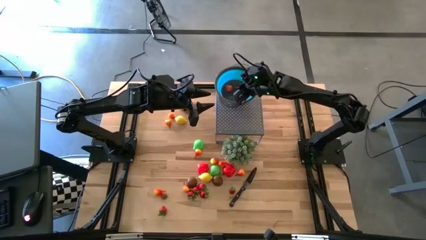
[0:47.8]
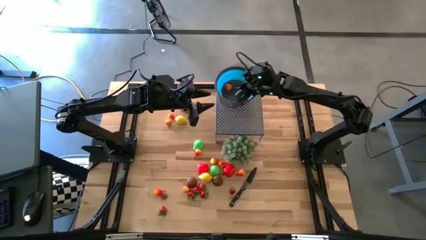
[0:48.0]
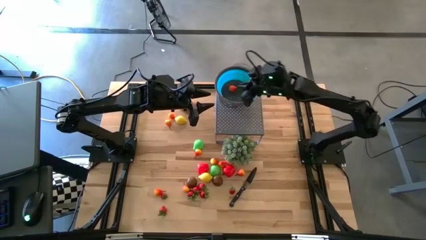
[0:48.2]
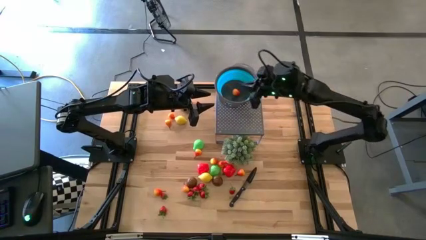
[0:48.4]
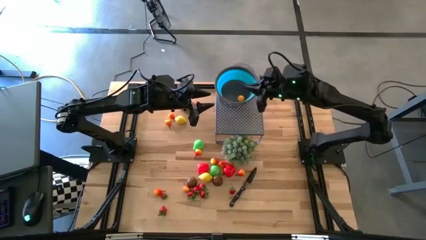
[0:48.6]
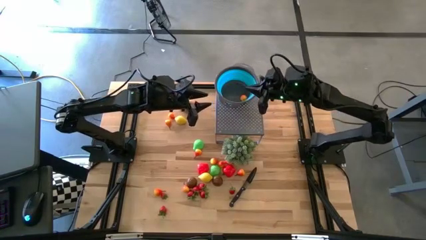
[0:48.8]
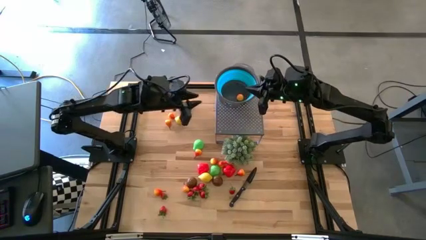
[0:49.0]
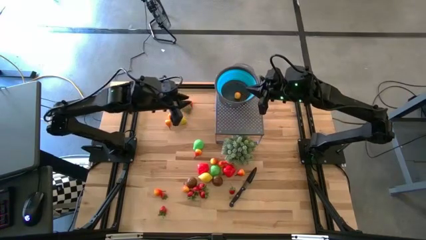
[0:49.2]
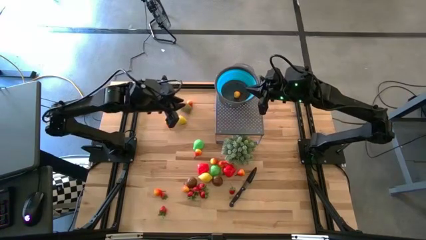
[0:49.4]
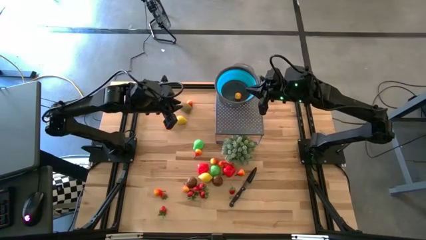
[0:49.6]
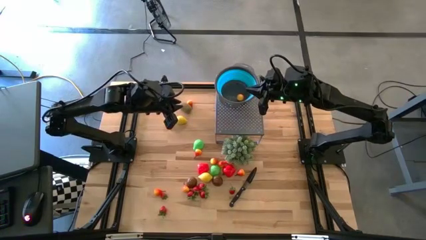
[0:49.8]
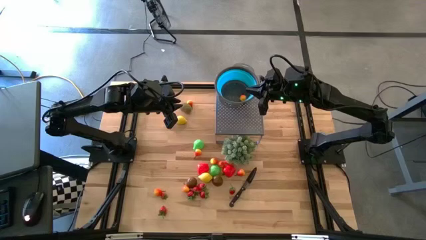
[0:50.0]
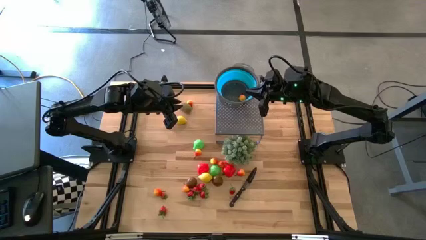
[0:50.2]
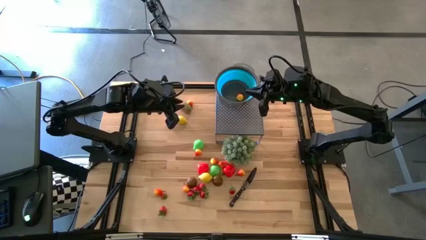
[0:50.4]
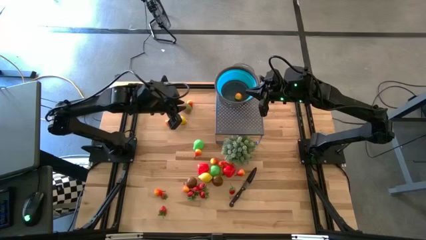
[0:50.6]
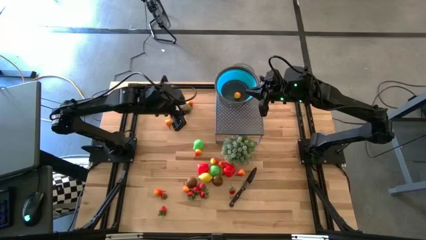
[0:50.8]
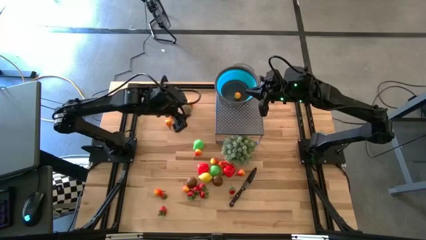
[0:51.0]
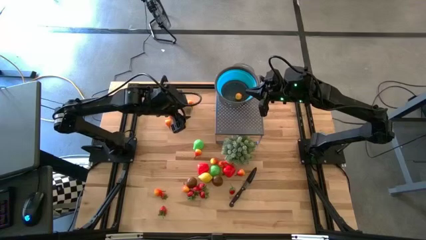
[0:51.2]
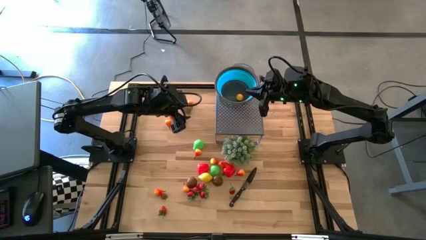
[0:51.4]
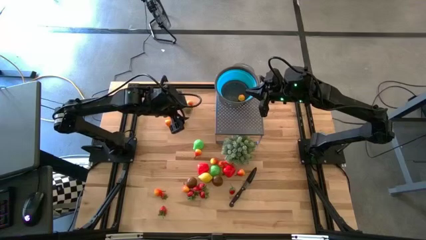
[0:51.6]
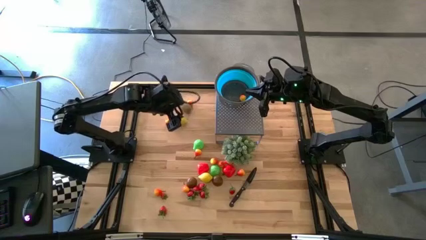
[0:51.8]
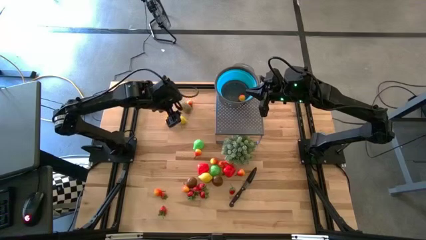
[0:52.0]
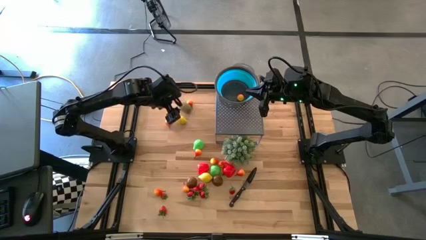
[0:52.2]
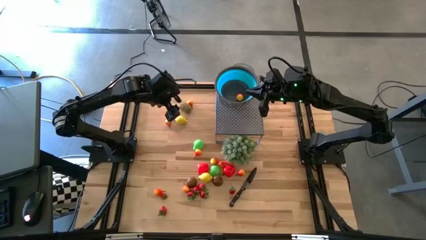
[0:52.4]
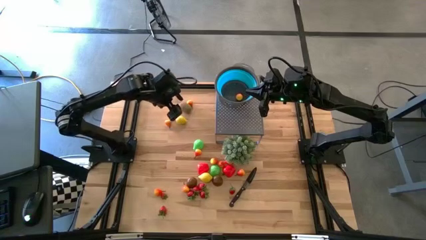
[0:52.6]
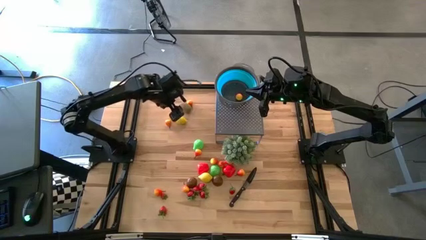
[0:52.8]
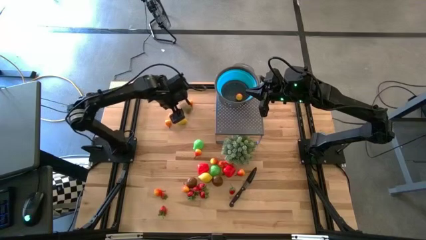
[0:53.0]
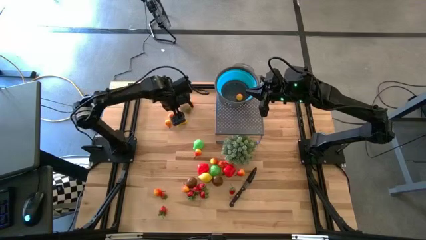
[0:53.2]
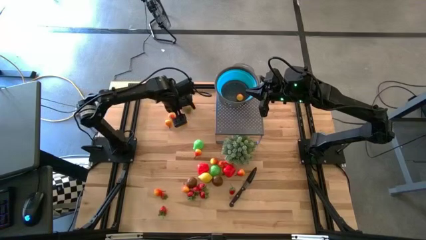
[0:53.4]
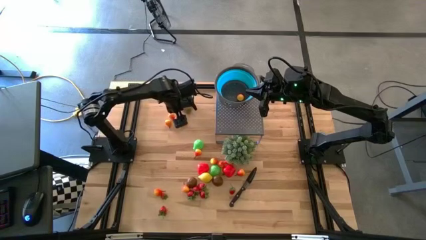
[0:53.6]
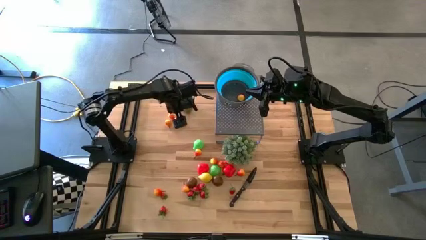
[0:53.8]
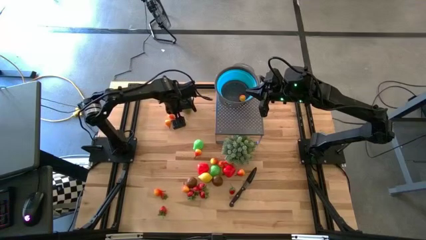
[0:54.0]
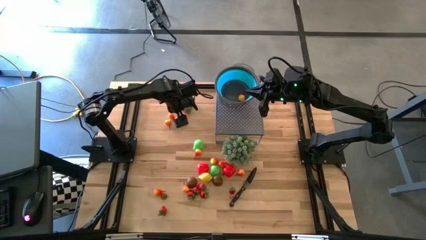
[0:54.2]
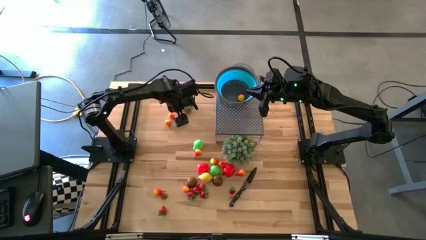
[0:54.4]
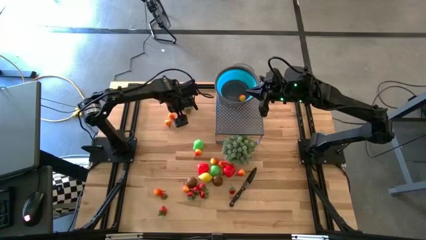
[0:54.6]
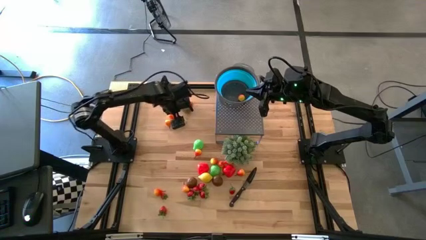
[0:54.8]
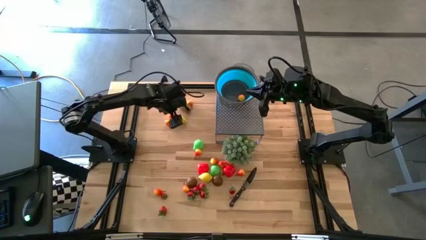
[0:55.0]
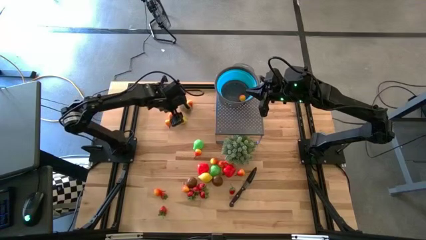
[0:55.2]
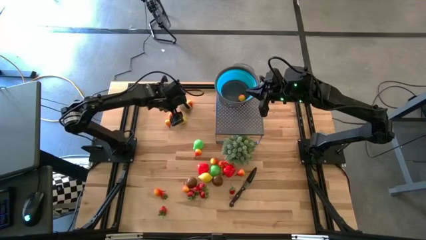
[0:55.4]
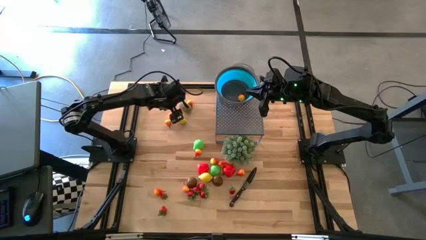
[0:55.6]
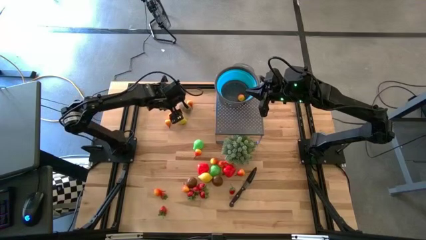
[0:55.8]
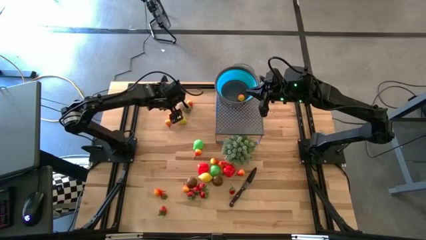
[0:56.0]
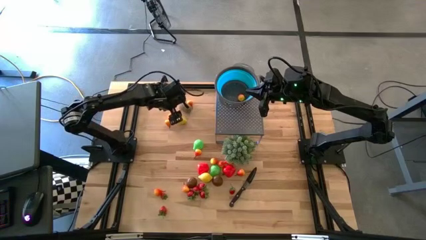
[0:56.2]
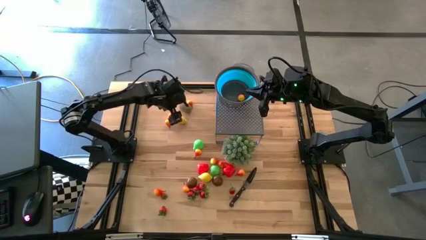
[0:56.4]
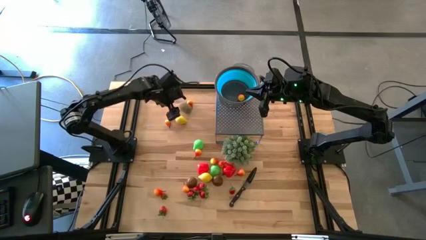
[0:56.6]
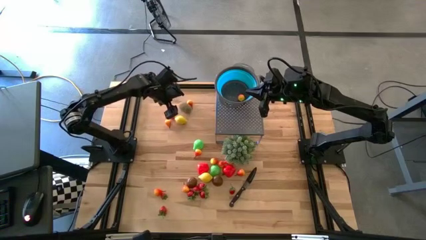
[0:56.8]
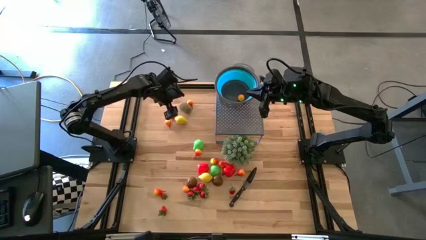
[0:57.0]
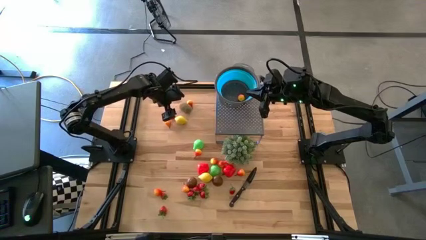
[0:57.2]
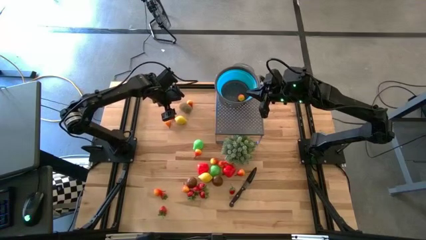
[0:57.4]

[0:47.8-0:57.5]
Task: Pick & Place Fruit
Put the yellow lemon into the blue strainer bowl

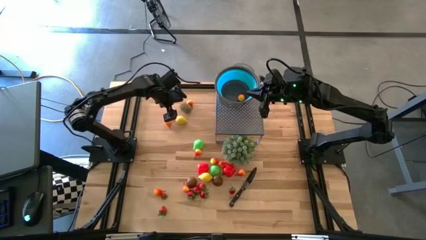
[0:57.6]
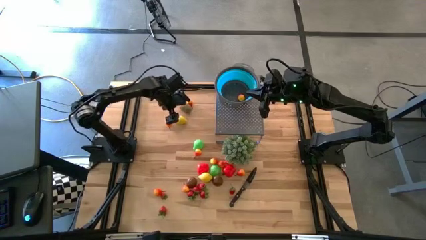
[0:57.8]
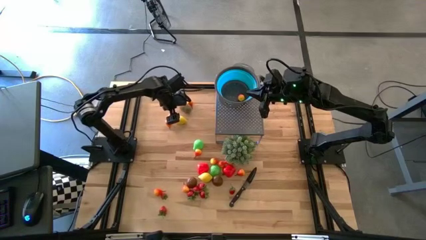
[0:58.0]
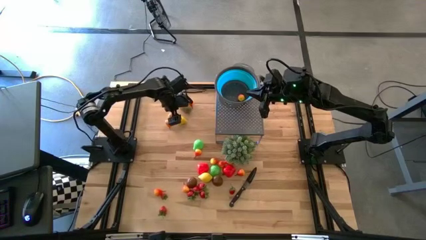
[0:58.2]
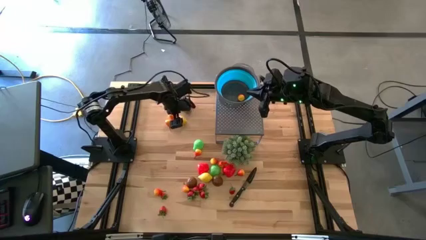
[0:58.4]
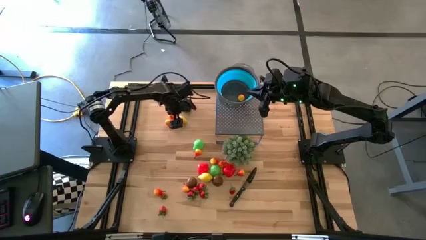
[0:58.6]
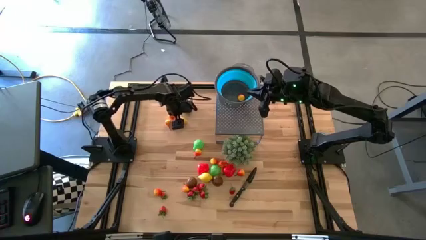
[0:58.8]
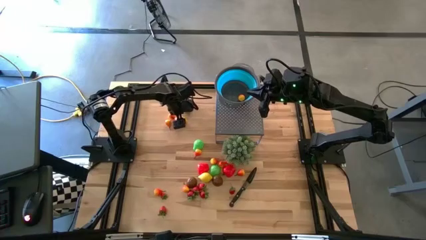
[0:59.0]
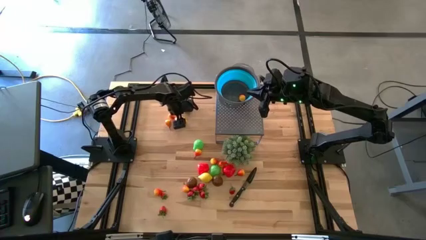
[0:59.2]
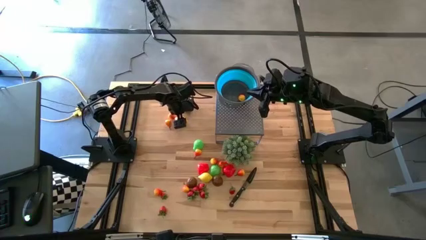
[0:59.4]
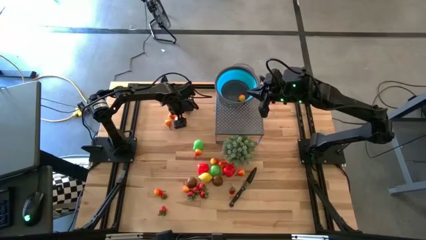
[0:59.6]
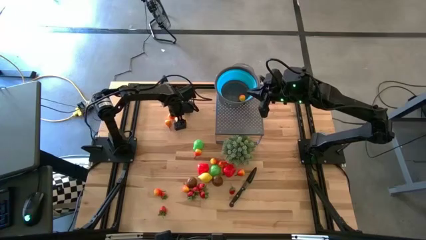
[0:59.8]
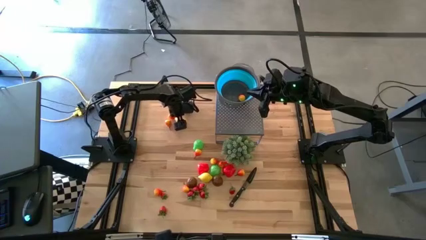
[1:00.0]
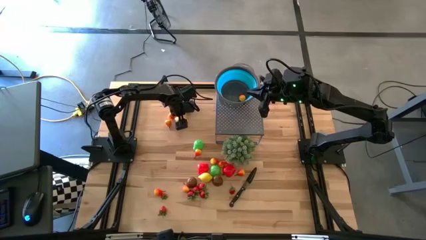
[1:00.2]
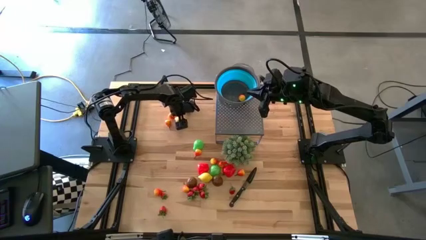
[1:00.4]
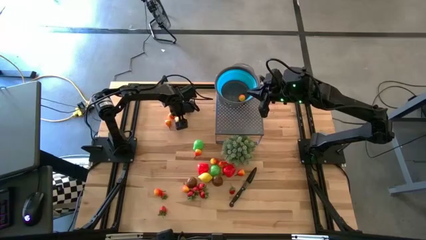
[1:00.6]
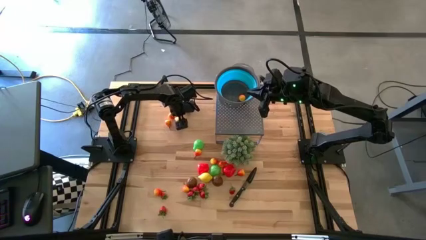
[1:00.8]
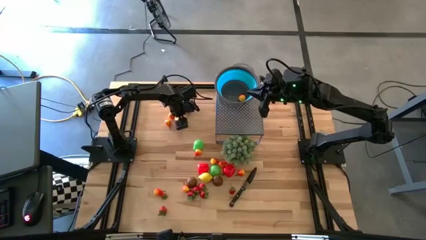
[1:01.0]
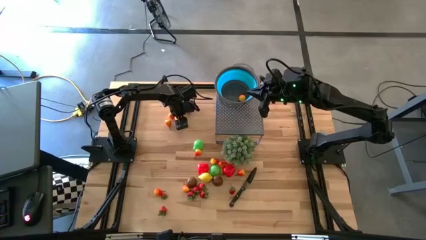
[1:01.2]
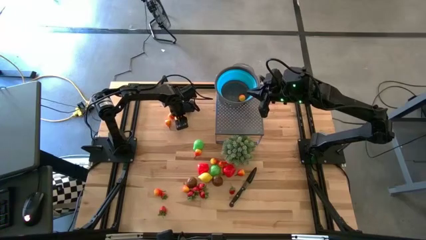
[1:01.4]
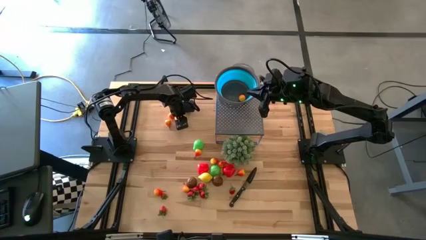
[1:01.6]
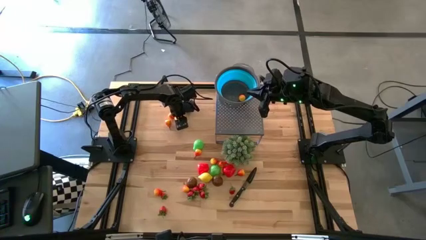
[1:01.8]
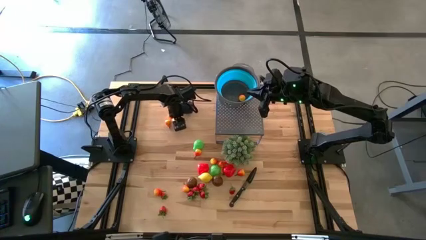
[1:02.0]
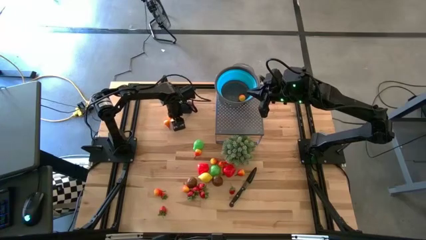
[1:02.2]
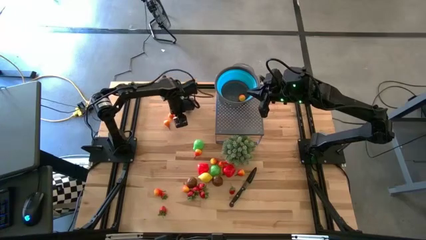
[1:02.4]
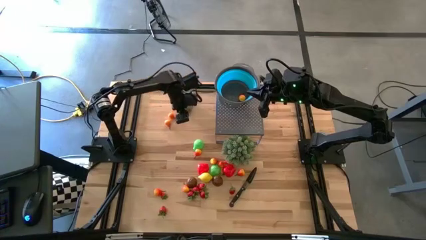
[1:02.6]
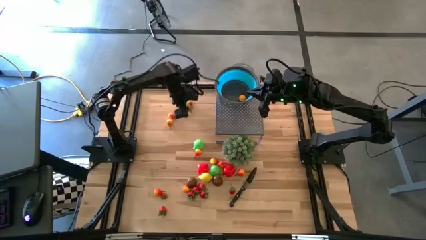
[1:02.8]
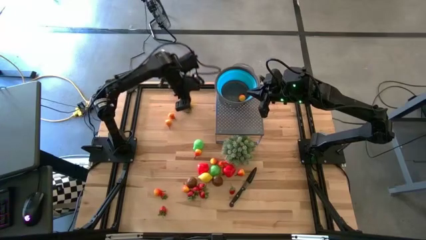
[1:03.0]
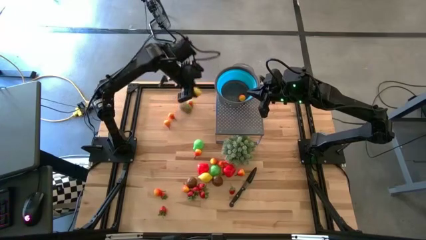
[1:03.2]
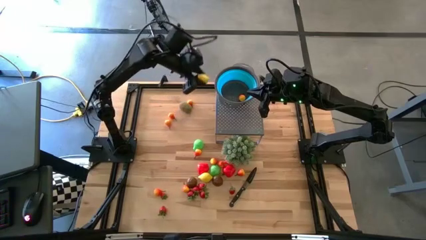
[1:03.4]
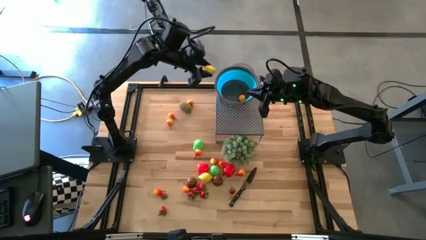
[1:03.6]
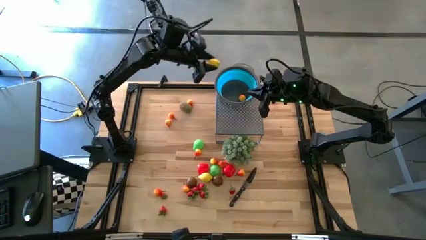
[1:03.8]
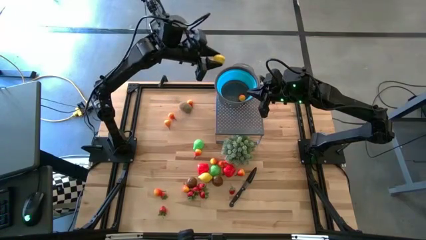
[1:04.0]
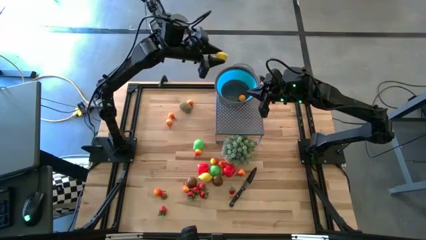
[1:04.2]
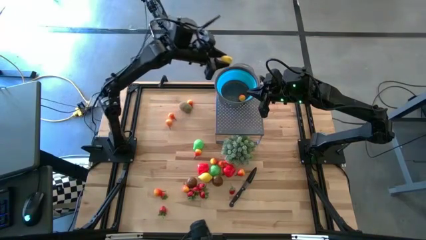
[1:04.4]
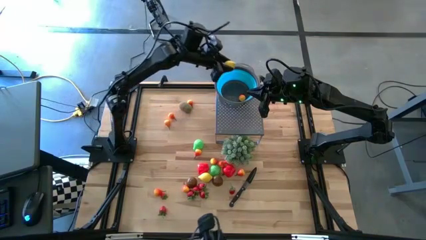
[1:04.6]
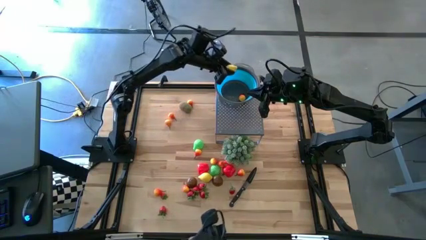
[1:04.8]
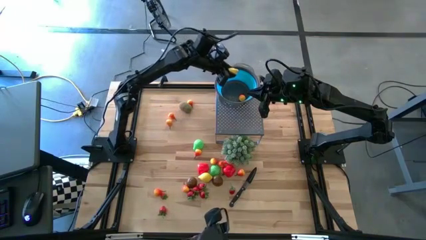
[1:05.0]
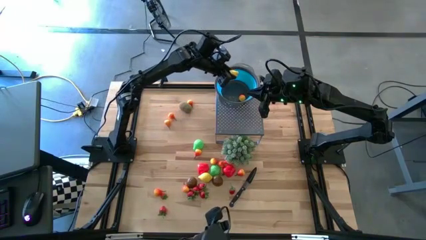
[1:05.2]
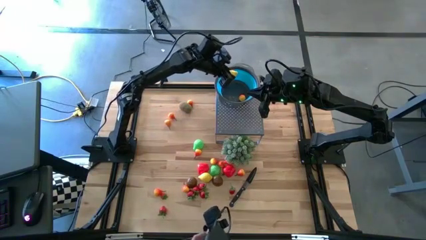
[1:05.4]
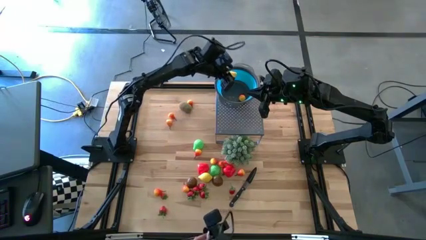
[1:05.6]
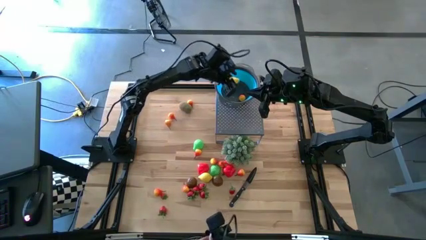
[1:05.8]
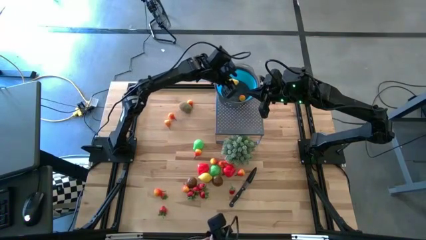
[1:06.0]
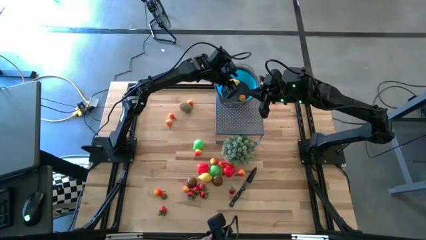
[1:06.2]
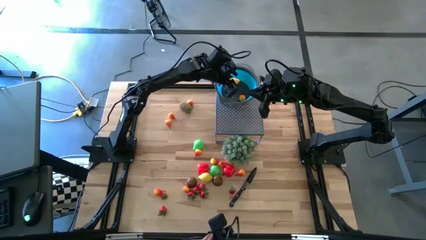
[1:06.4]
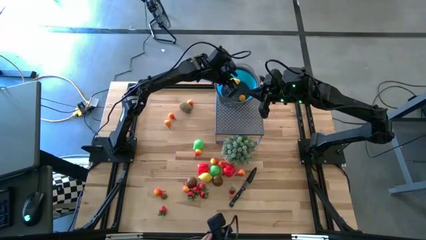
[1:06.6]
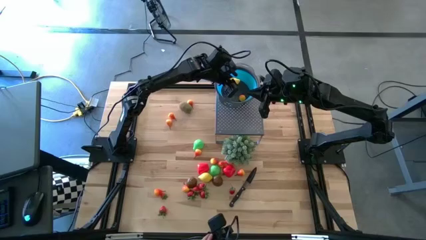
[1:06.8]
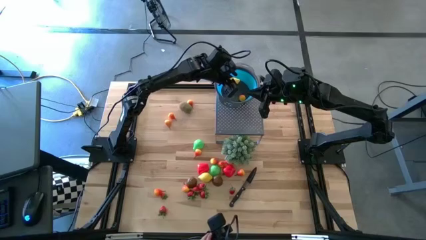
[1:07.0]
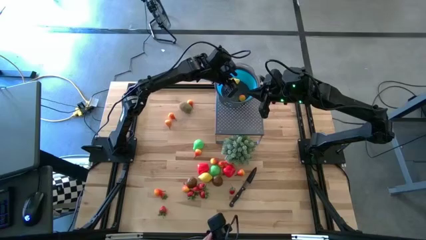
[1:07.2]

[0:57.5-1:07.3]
Put the yellow lemon into the blue strainer bowl
